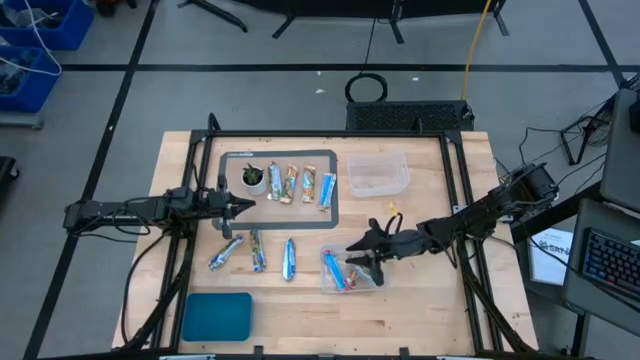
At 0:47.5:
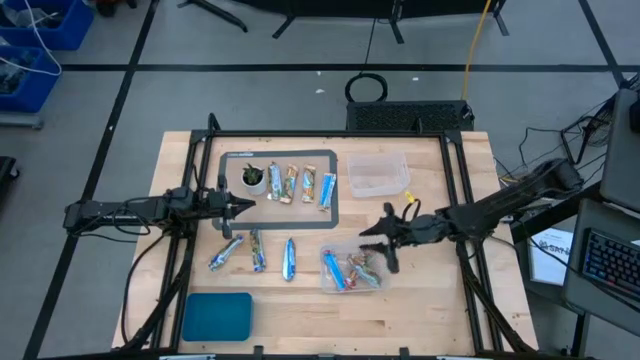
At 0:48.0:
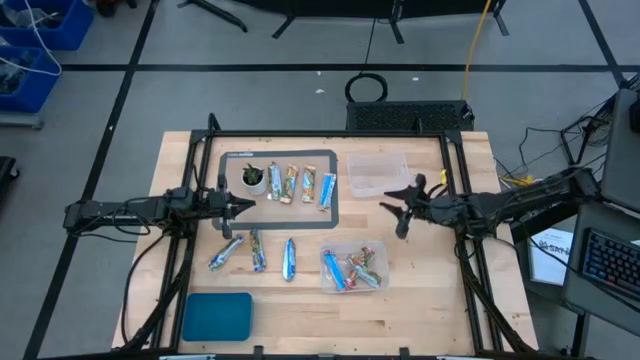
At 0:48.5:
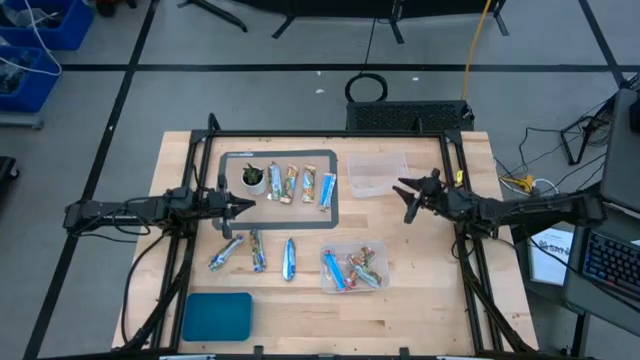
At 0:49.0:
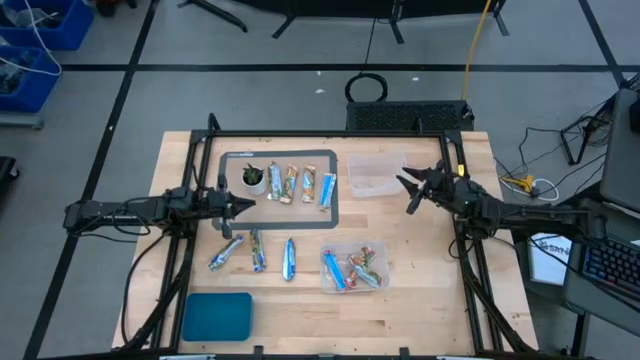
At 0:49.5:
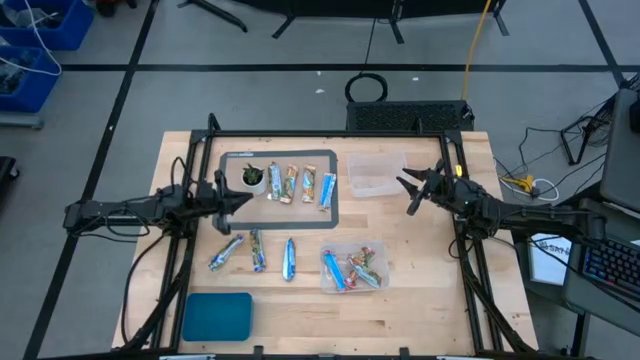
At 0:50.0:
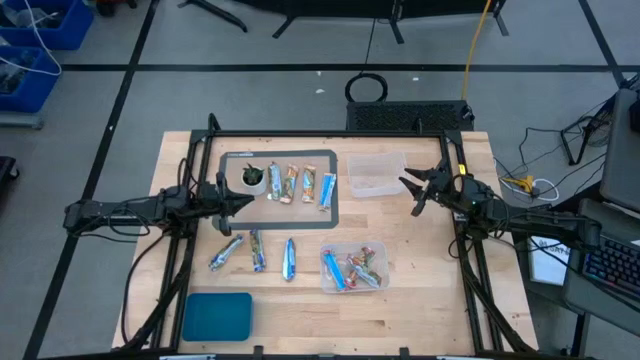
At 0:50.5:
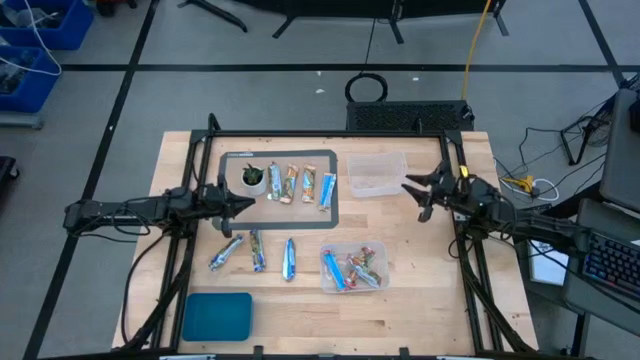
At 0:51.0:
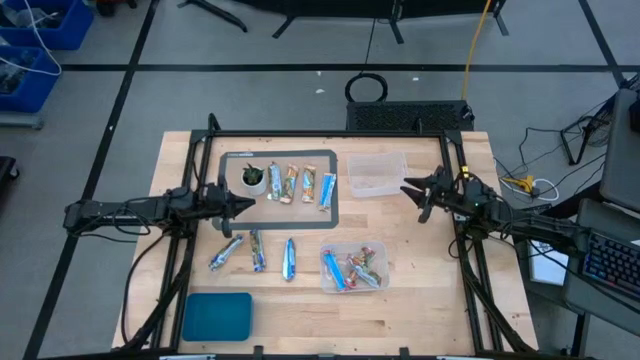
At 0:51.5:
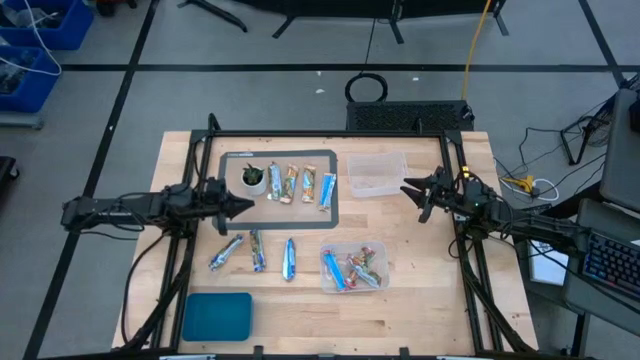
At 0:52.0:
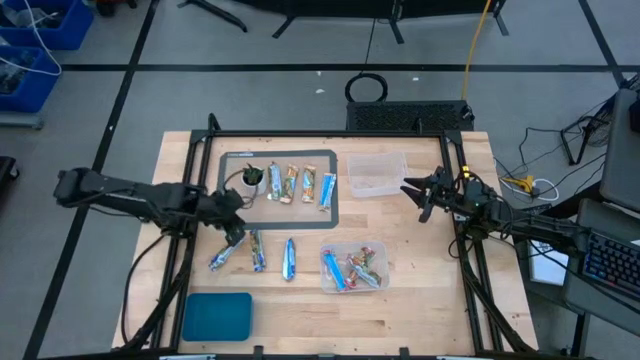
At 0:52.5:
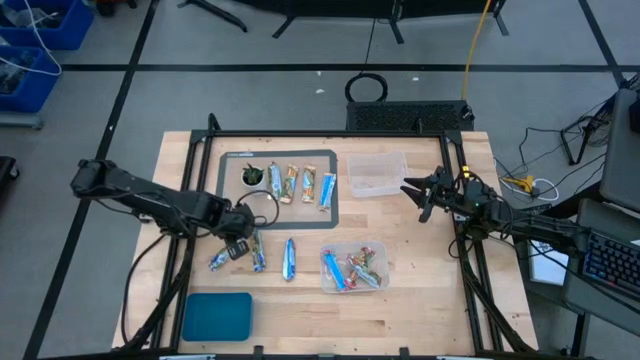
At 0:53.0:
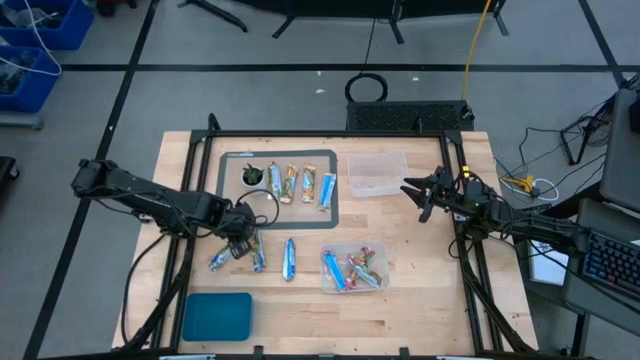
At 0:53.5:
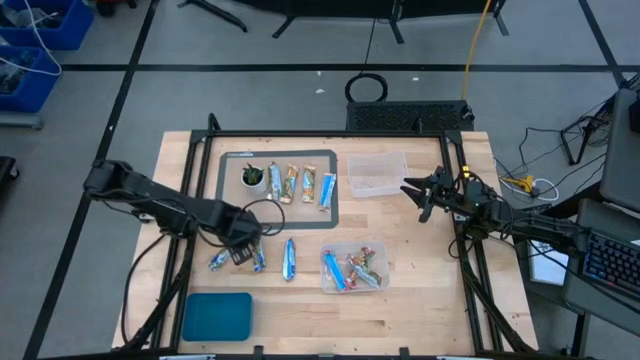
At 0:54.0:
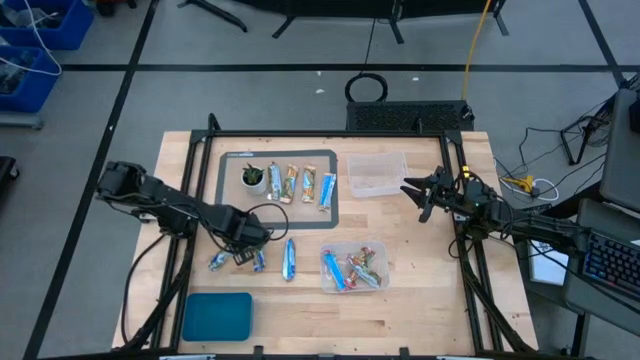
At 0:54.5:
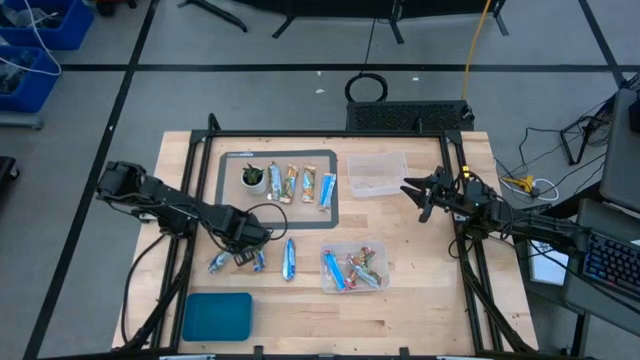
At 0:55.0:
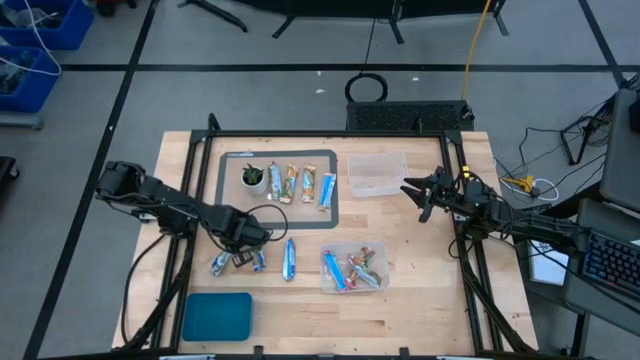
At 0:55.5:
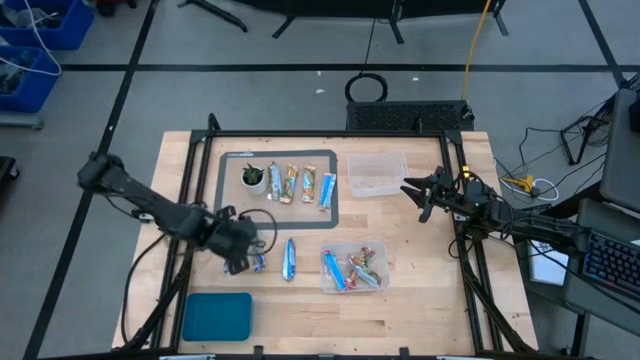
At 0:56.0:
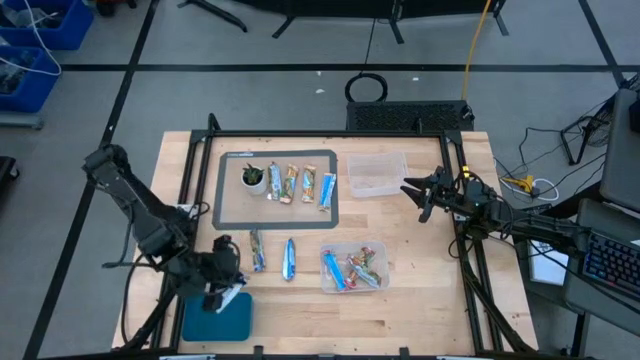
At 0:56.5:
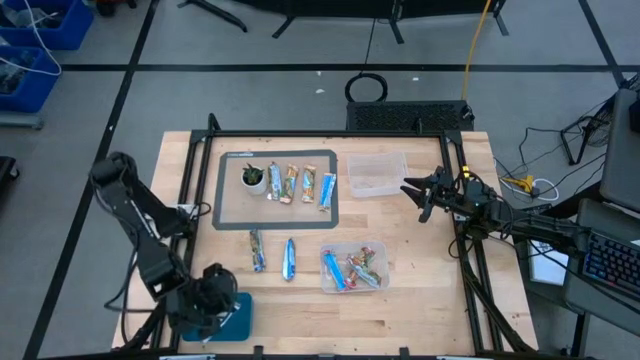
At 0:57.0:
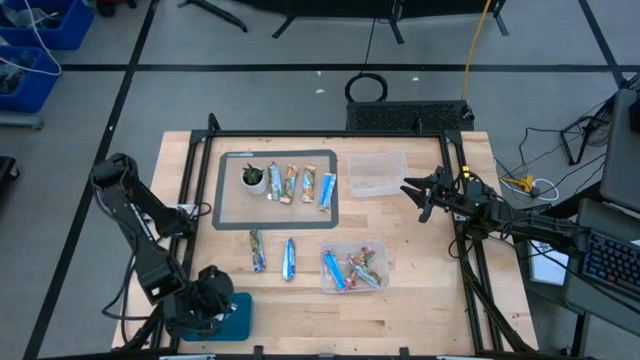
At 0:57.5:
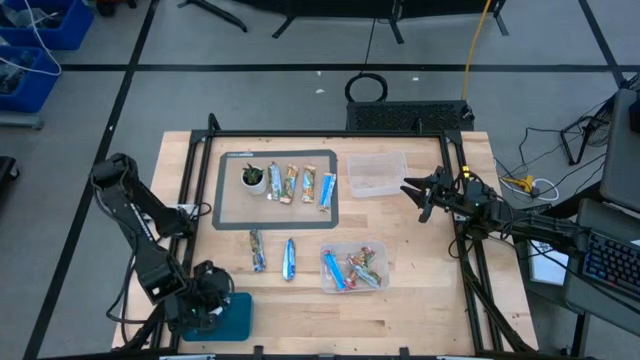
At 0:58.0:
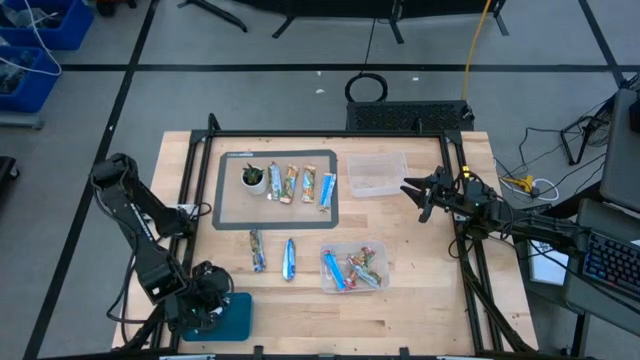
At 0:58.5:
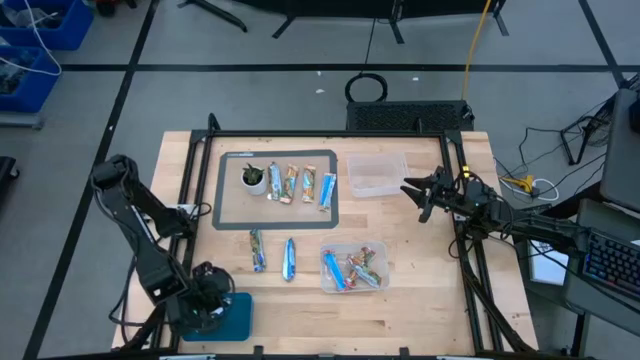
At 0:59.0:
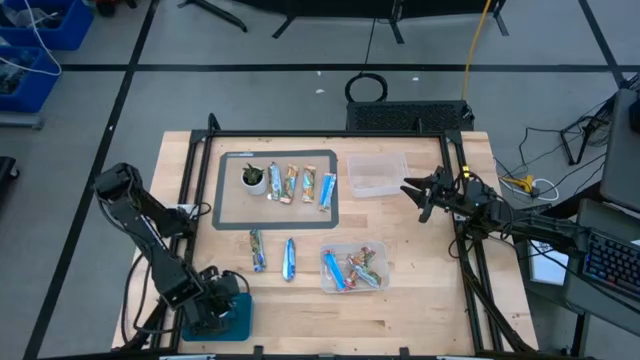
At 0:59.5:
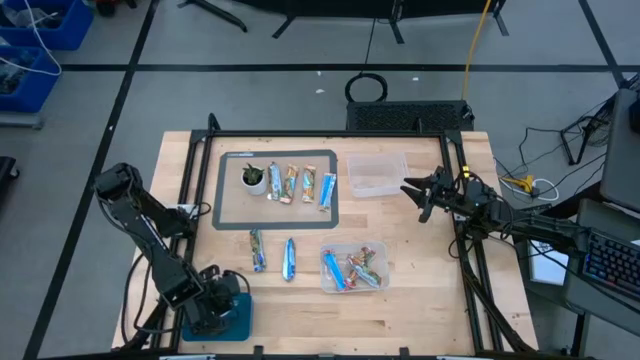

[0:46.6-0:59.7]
Task: Pick and place Granola Bars by type
Put the left blue granola bar into the blue bin

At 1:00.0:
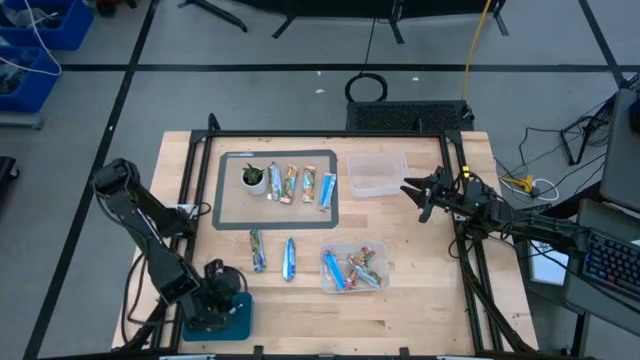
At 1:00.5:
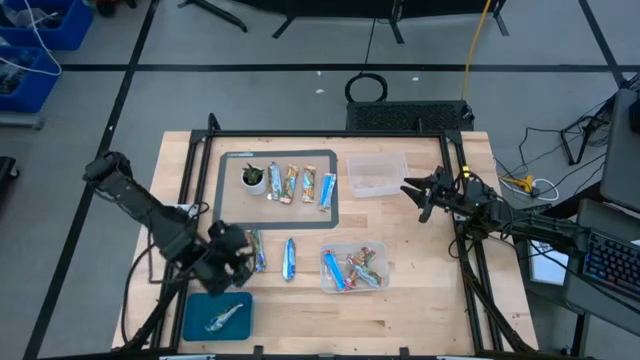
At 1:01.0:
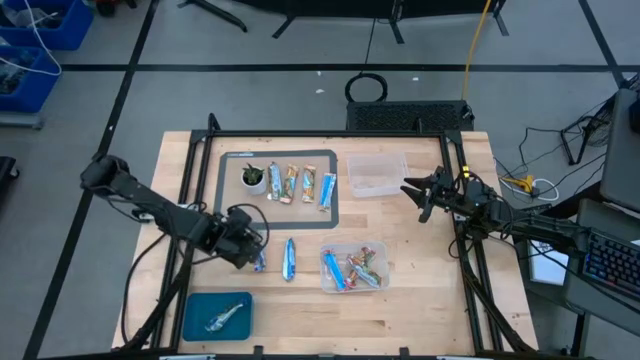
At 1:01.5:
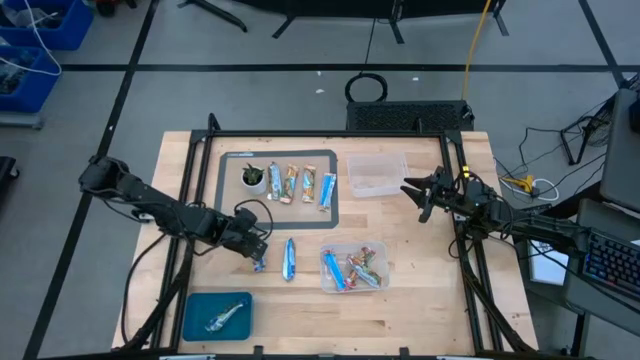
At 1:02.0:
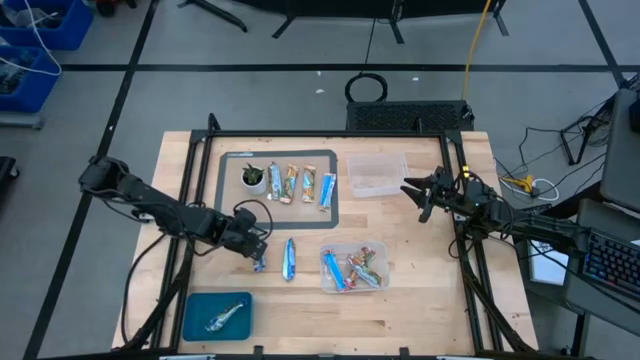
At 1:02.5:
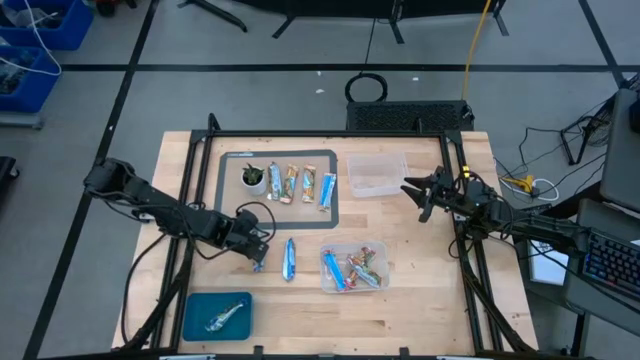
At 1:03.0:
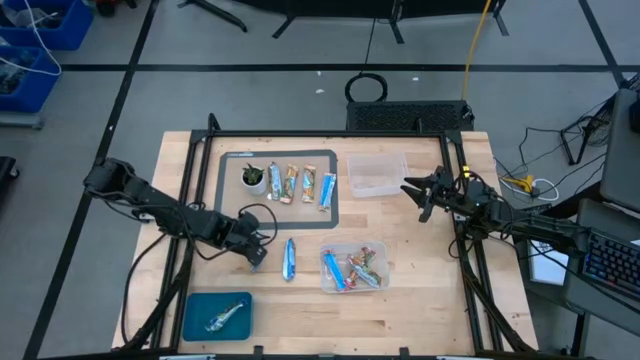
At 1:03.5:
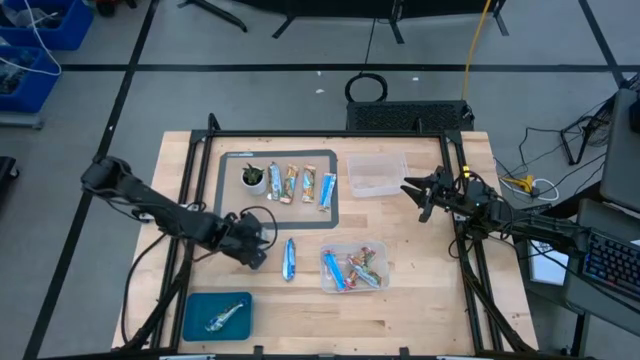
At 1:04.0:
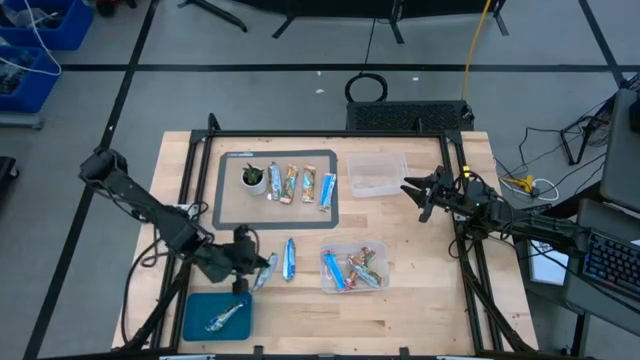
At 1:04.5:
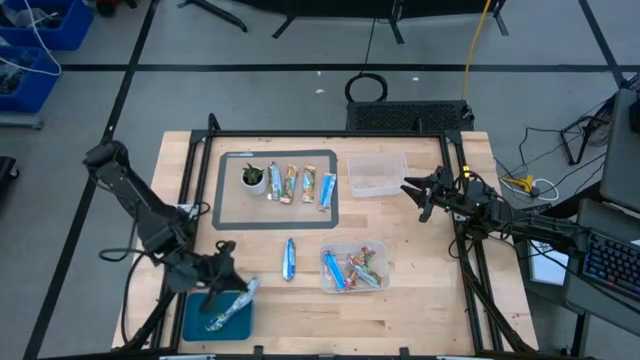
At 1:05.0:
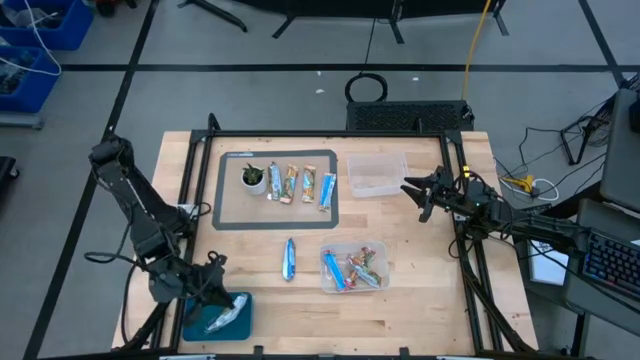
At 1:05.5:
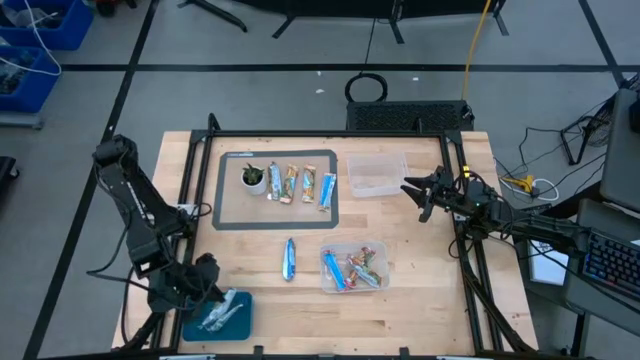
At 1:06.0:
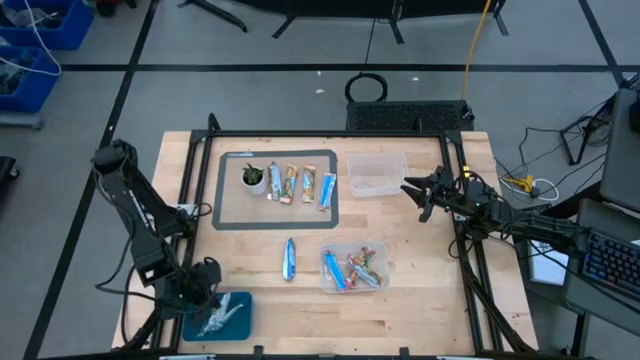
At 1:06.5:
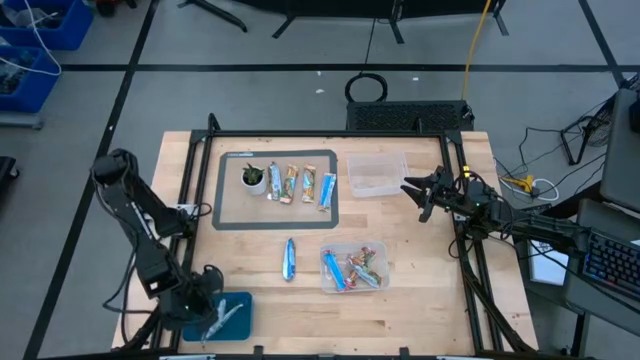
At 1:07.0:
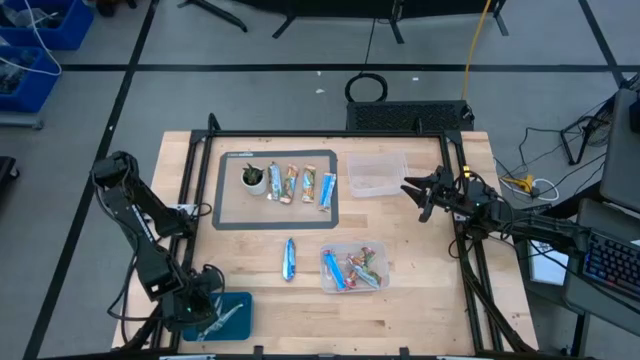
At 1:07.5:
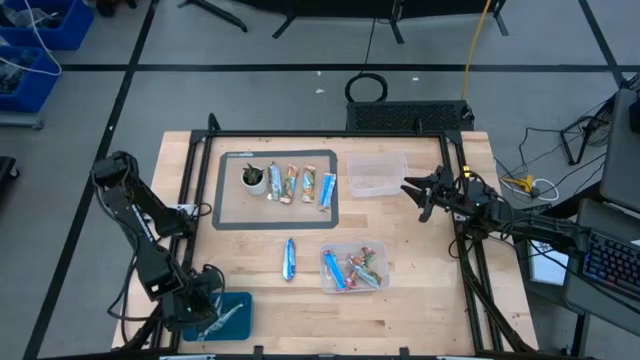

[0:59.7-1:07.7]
Put the middle blue granola bar into the blue bin

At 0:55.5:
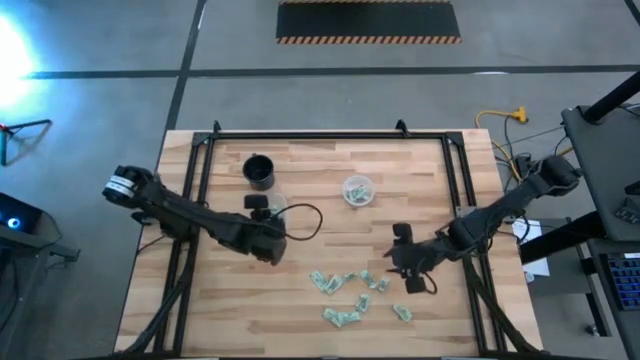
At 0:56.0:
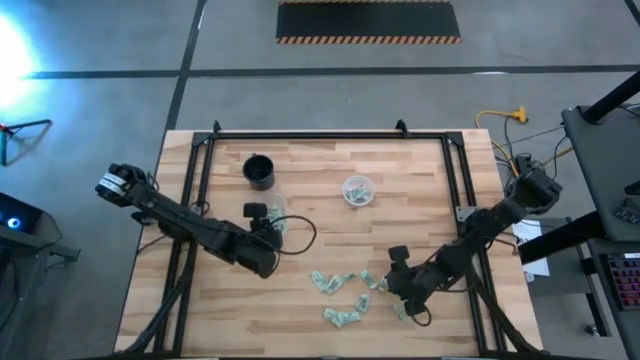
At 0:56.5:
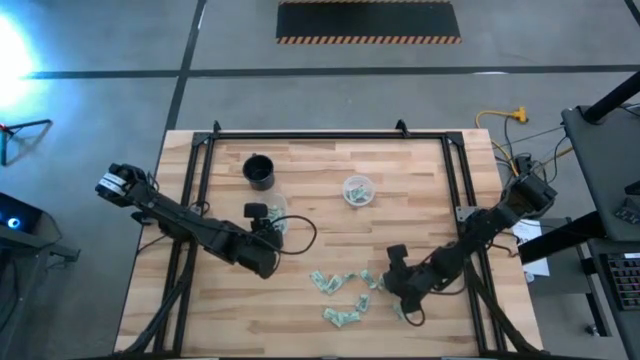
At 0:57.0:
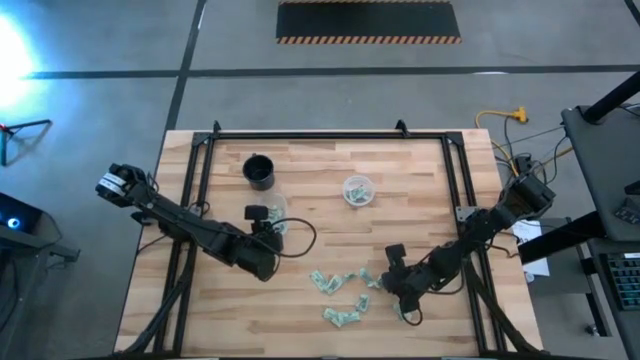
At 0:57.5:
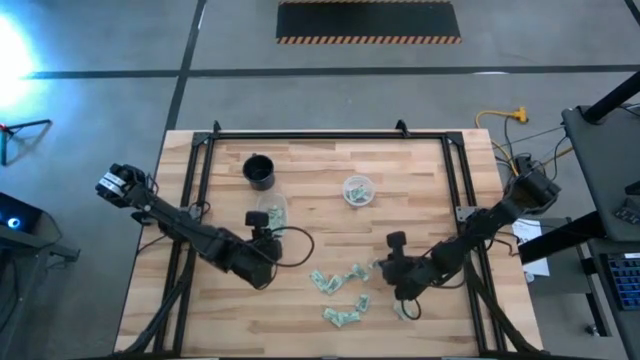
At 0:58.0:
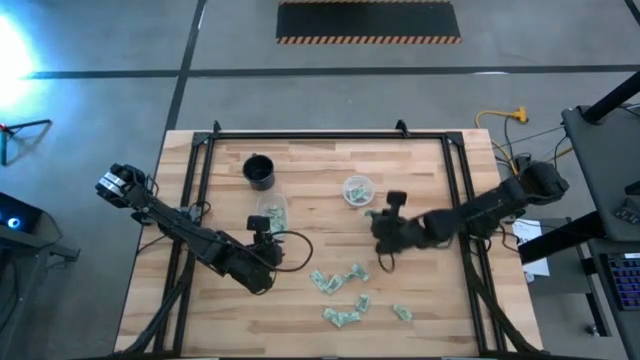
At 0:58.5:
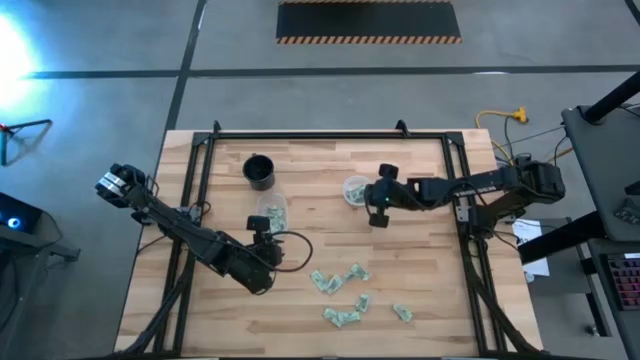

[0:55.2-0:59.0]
Task: Pick and place items into bin
Put the stevia packet into the right transparent bin
